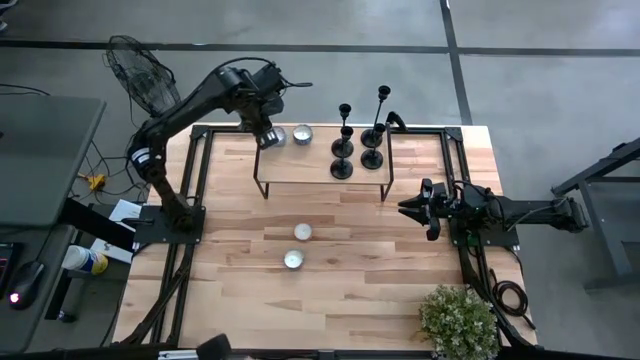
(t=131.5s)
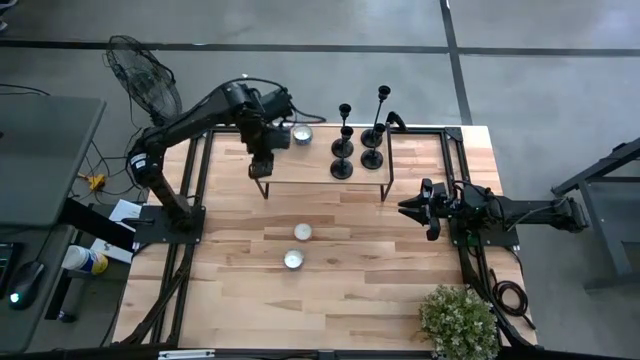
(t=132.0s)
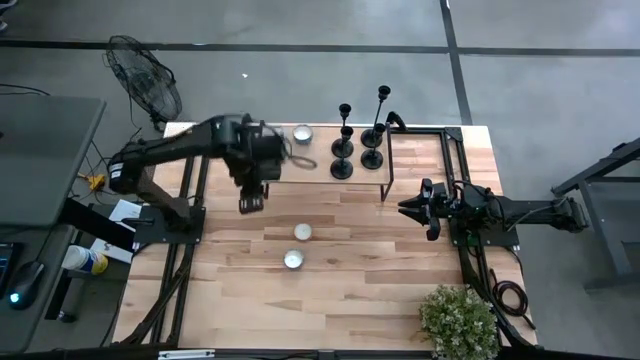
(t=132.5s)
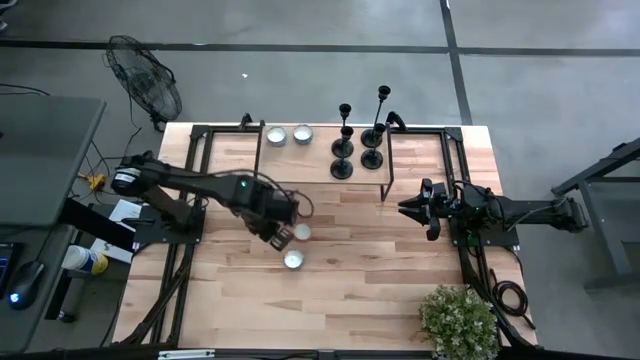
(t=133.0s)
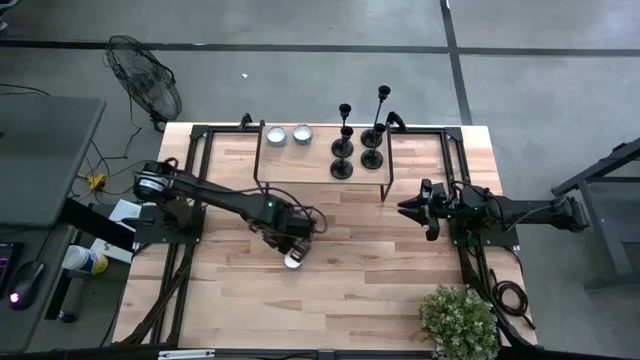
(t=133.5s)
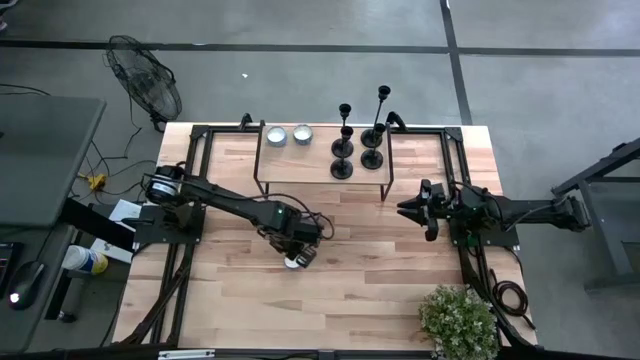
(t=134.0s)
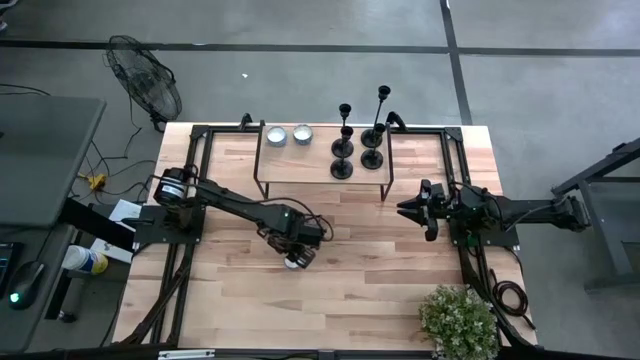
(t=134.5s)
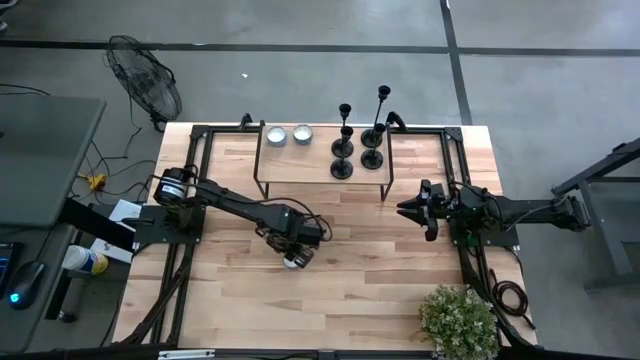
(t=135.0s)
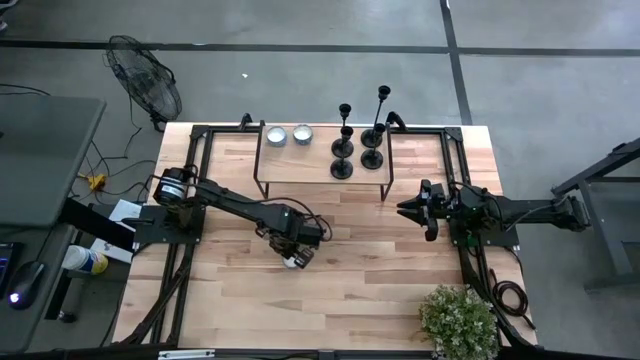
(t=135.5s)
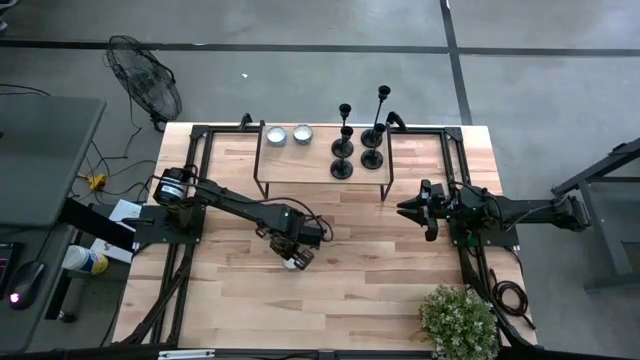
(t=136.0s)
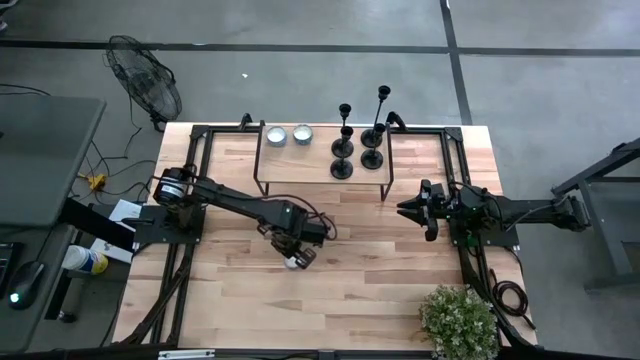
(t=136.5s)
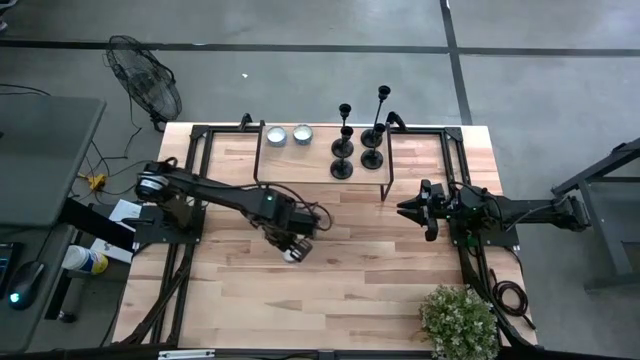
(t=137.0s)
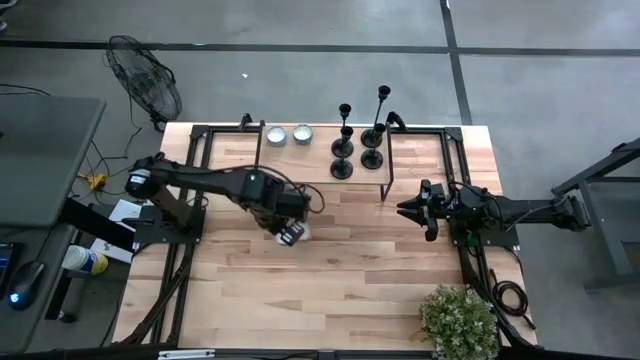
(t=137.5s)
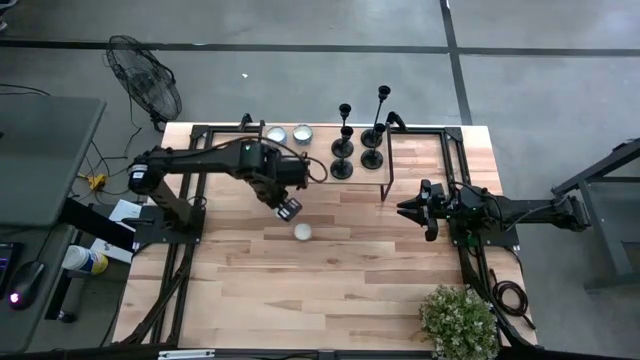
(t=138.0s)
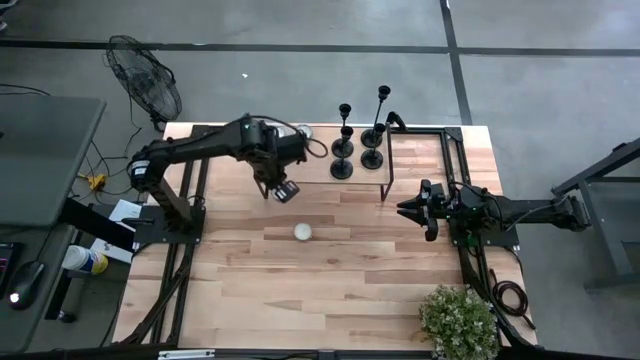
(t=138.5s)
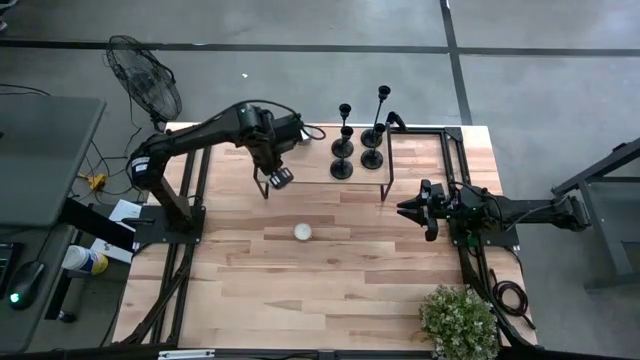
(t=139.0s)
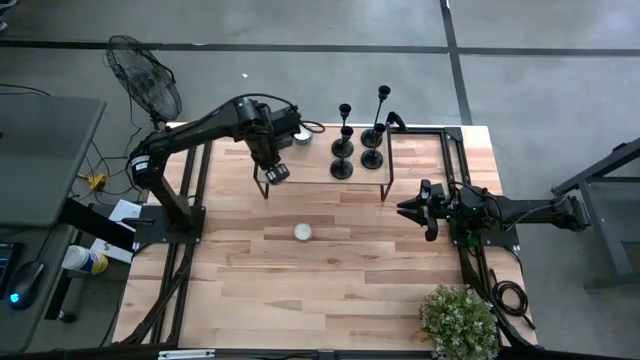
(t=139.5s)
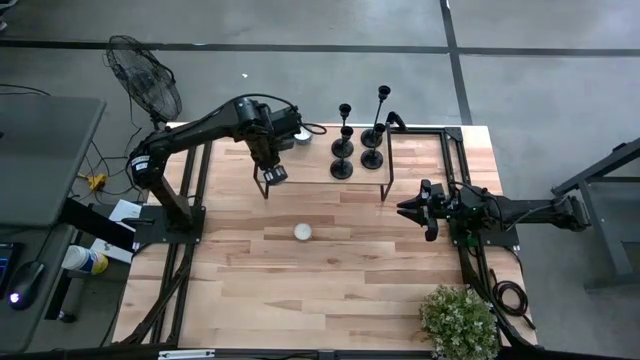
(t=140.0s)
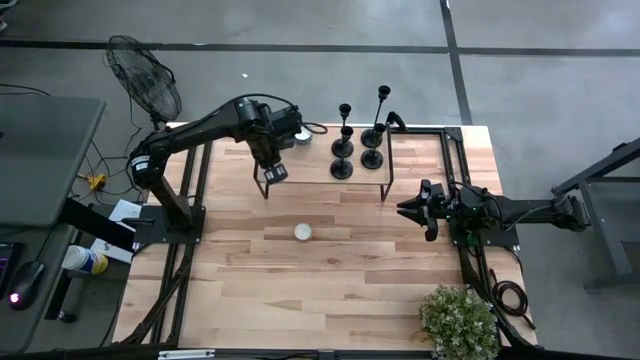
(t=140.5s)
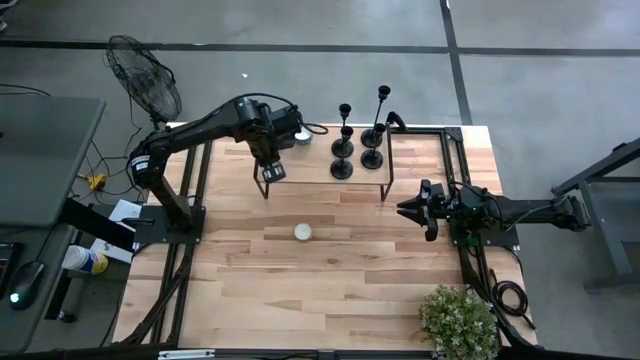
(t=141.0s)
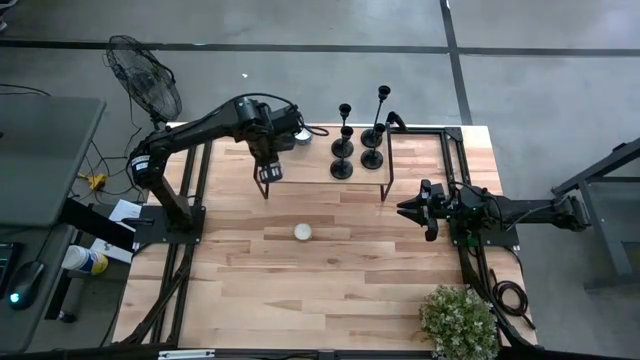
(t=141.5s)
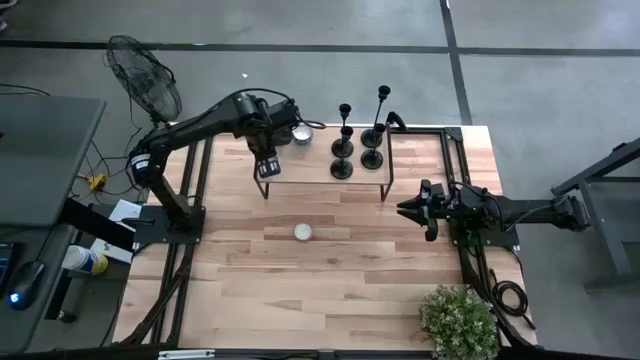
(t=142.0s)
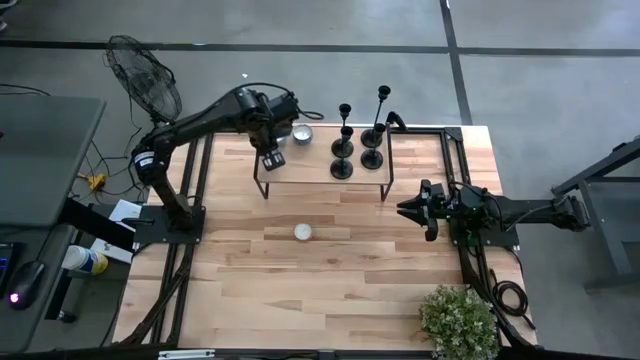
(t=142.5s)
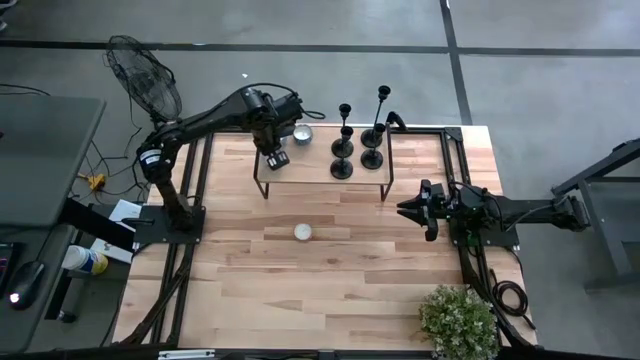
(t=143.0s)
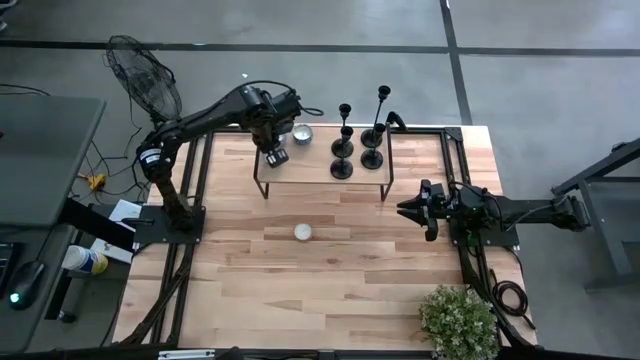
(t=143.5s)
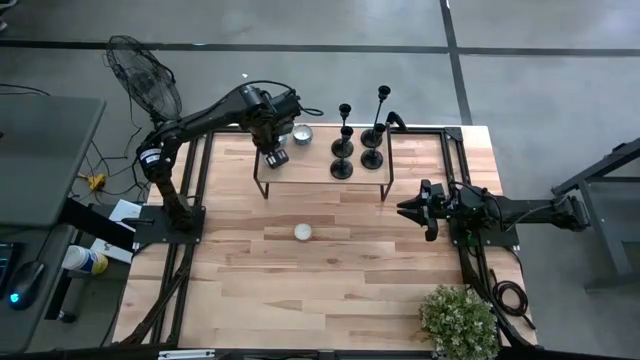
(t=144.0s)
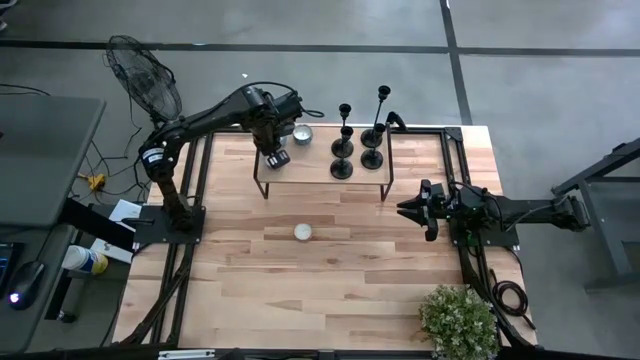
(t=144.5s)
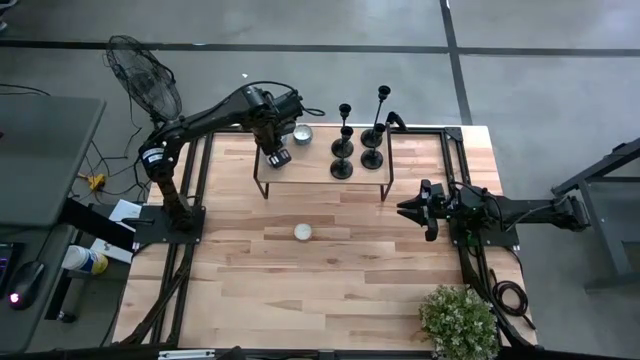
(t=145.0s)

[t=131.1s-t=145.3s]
Task: Pick & Place candle stick holders
Put the red scented candle on the shelf and align it with the light blue scented candle

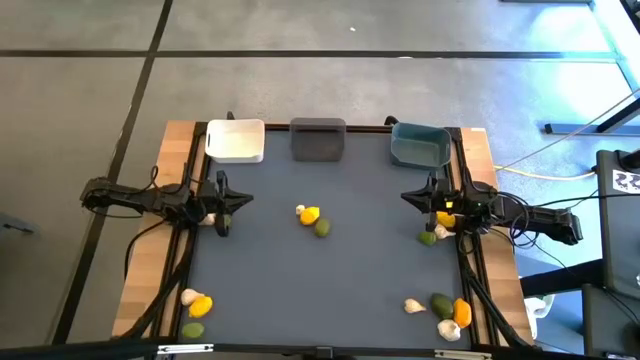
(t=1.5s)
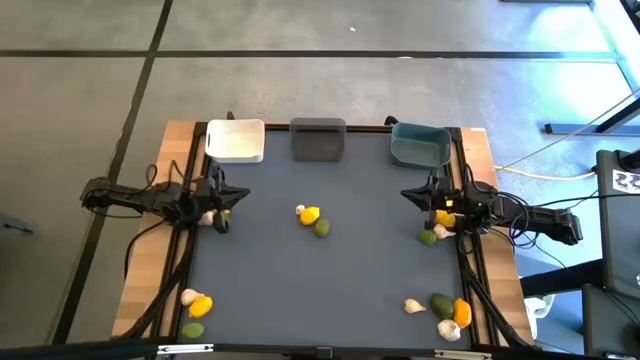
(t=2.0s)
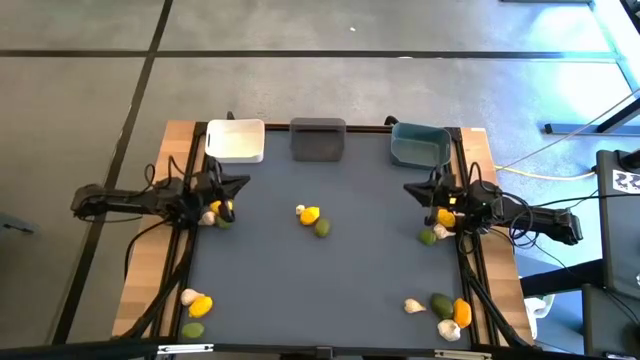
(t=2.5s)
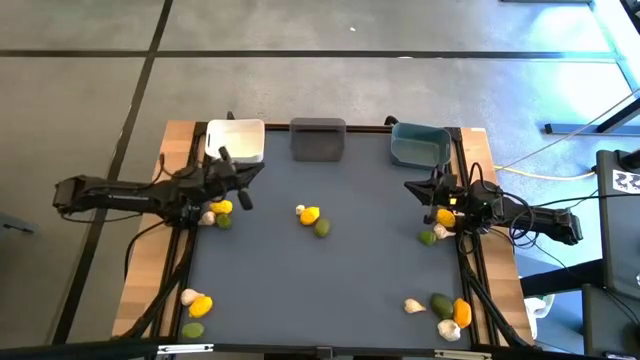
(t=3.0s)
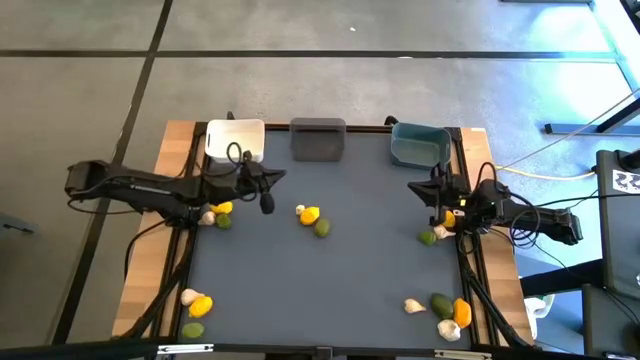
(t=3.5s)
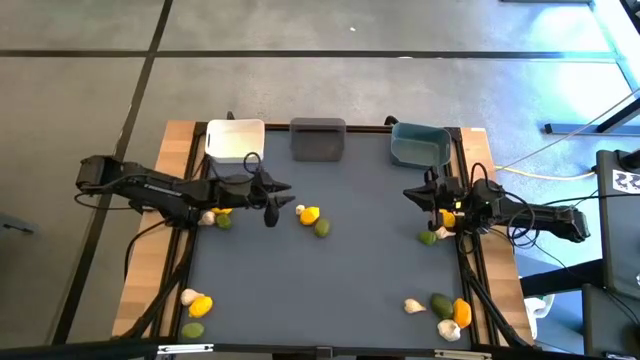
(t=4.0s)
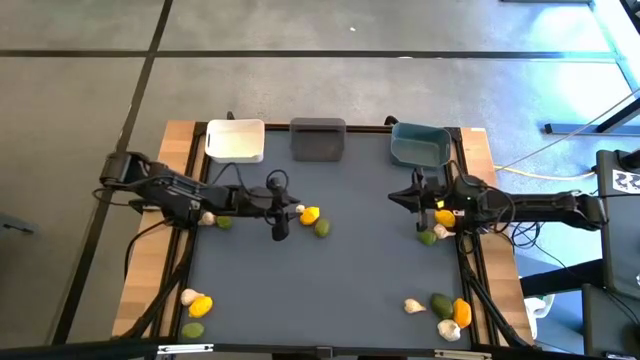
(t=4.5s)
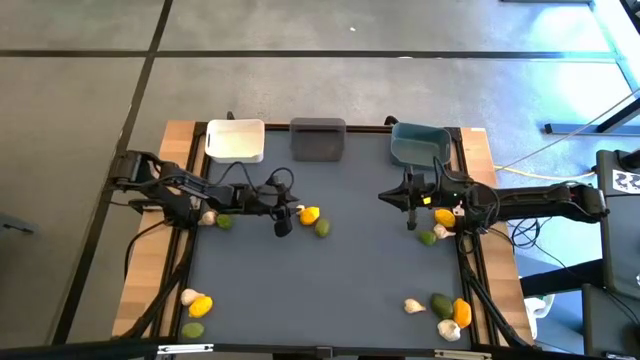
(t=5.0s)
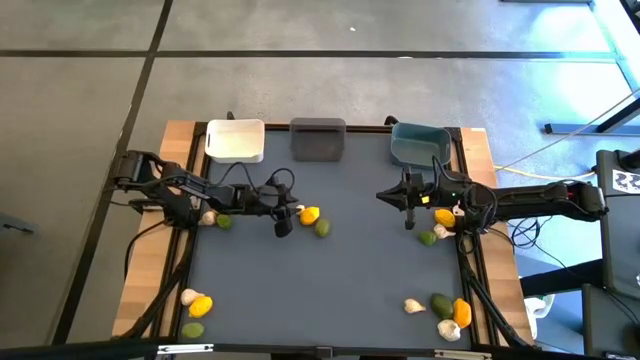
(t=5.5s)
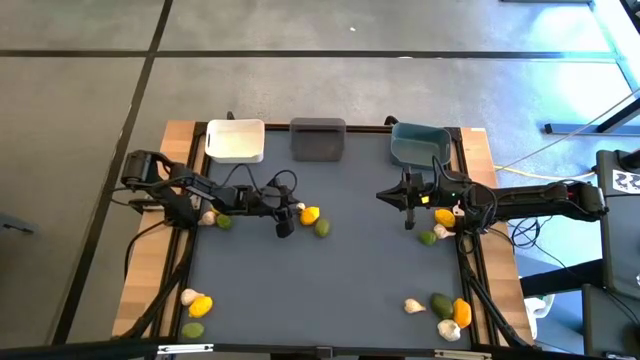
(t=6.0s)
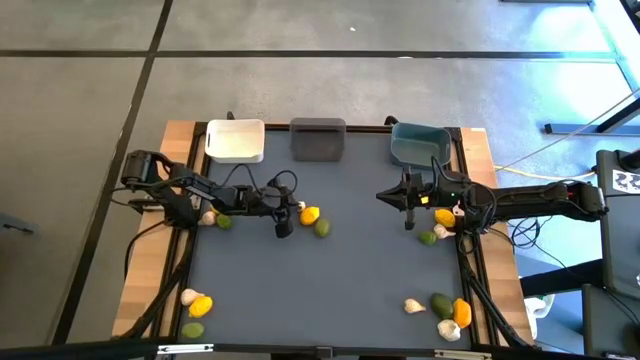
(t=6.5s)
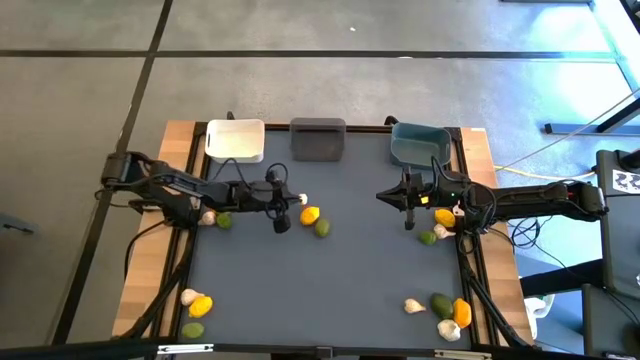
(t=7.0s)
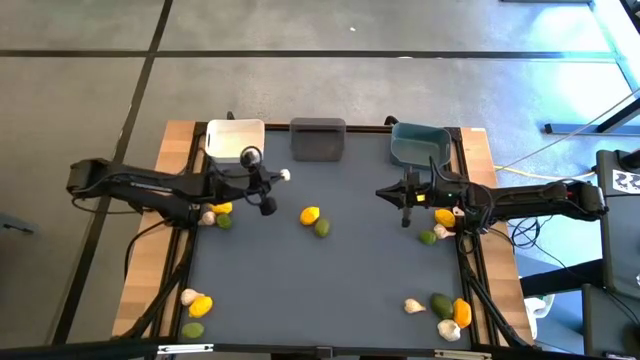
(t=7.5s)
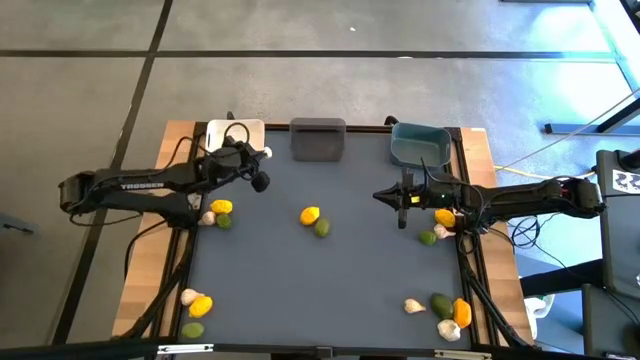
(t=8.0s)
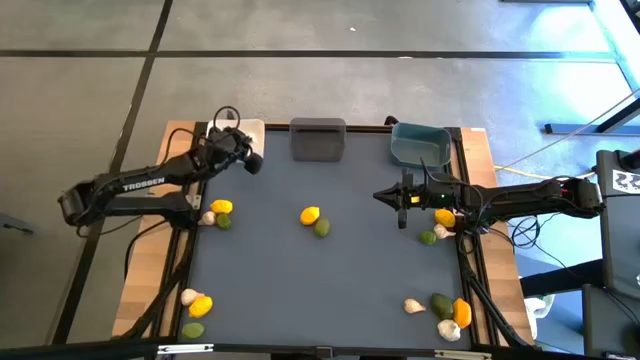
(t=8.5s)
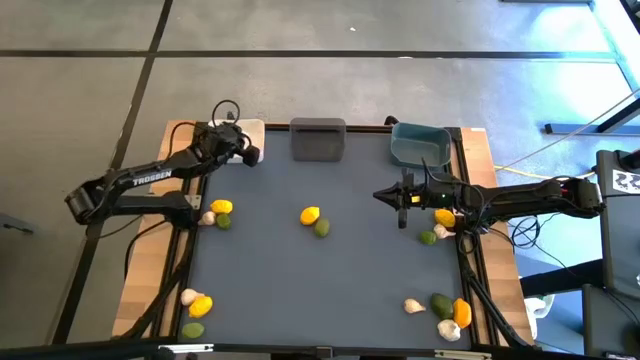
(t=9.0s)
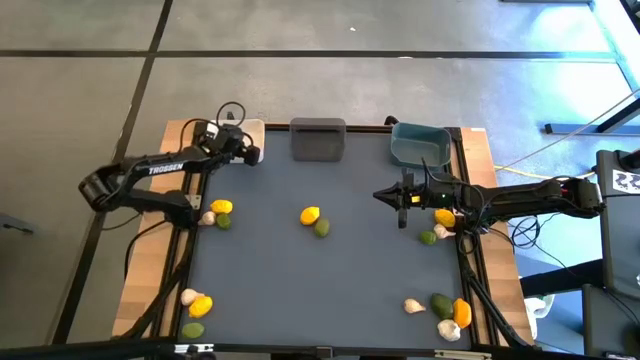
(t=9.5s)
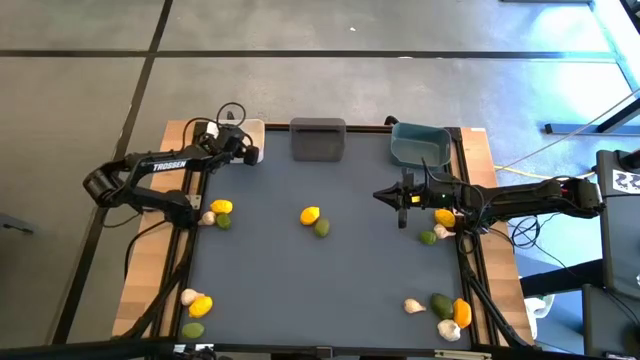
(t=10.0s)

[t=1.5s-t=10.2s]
Task: Sort produce into baskets
Put the garlic into the white bin
